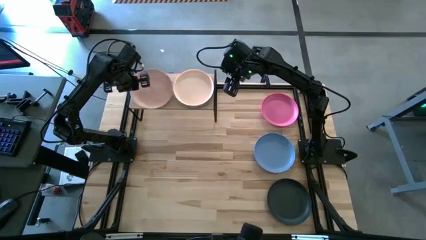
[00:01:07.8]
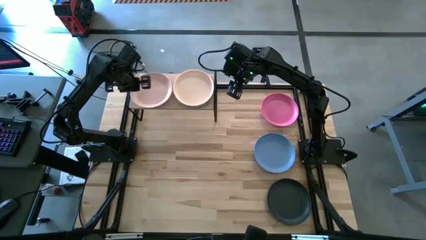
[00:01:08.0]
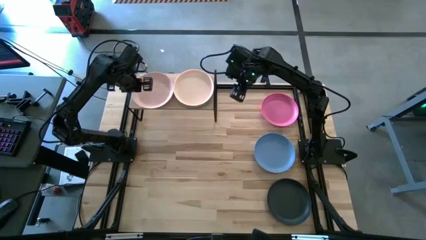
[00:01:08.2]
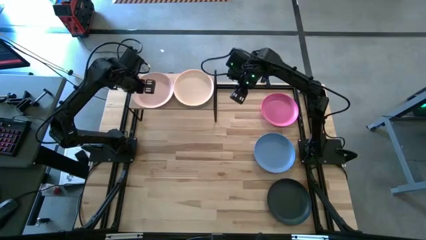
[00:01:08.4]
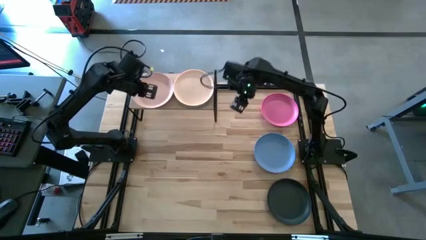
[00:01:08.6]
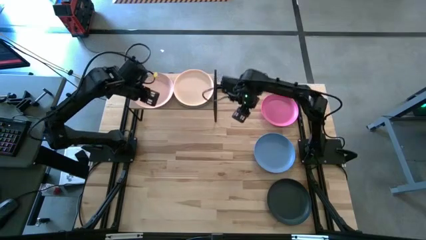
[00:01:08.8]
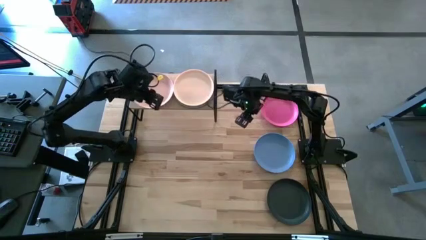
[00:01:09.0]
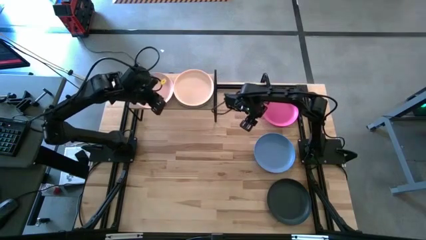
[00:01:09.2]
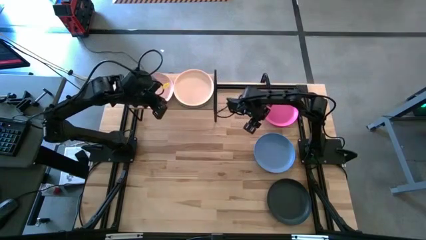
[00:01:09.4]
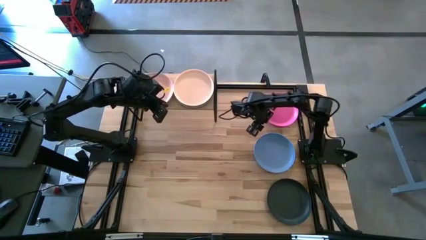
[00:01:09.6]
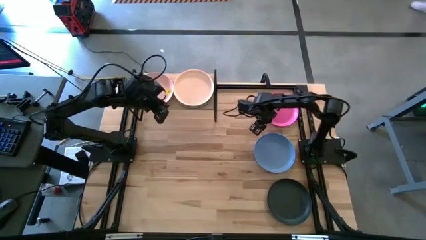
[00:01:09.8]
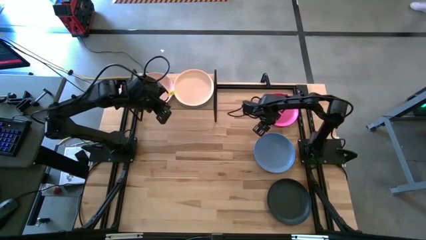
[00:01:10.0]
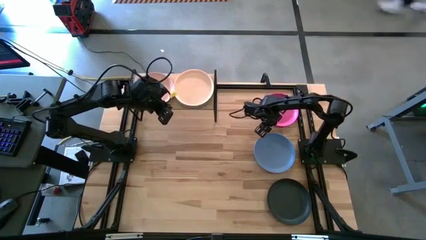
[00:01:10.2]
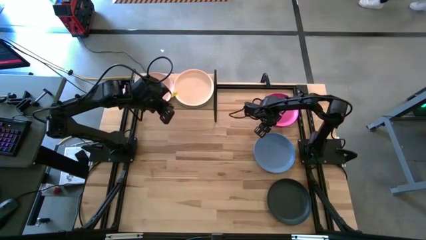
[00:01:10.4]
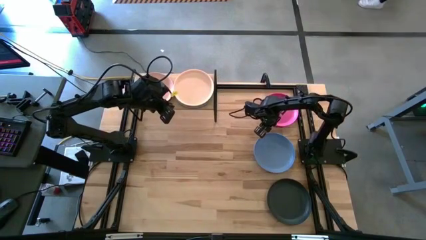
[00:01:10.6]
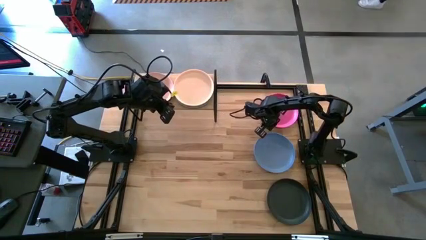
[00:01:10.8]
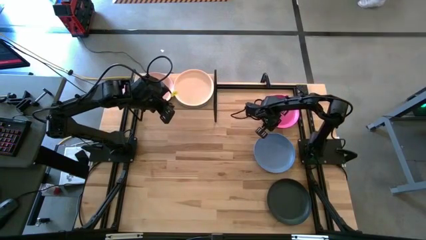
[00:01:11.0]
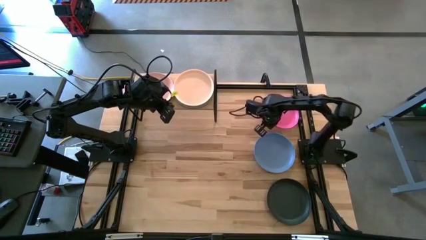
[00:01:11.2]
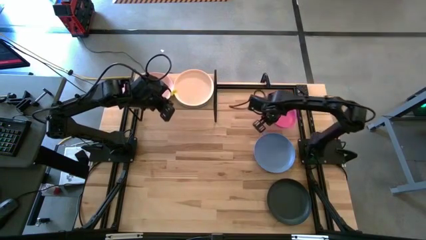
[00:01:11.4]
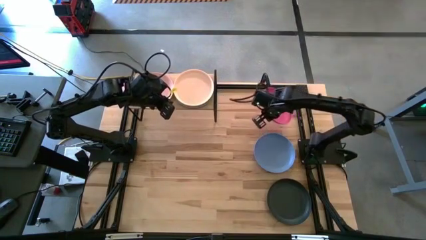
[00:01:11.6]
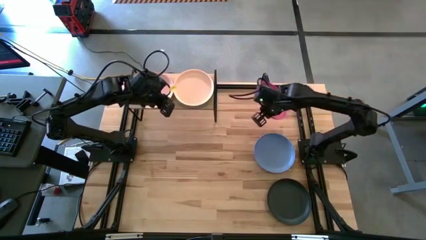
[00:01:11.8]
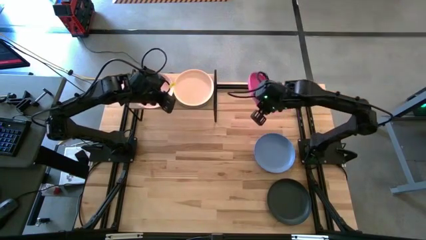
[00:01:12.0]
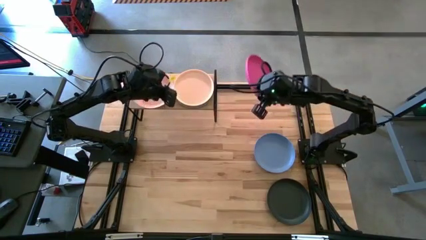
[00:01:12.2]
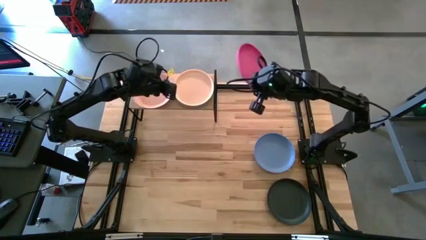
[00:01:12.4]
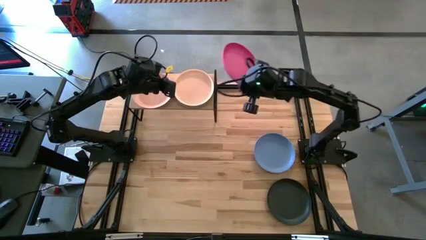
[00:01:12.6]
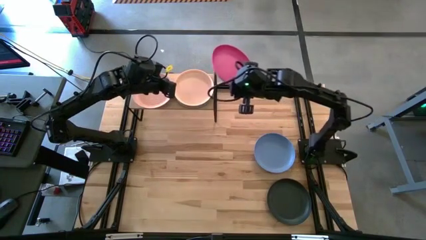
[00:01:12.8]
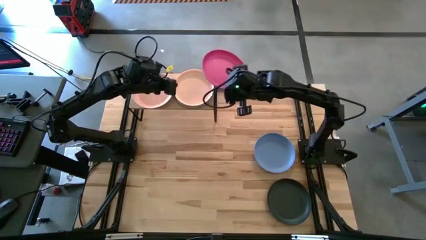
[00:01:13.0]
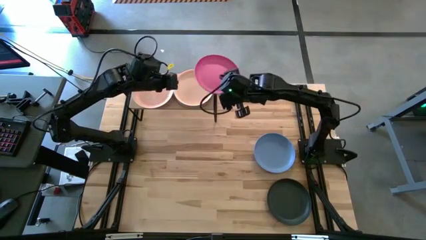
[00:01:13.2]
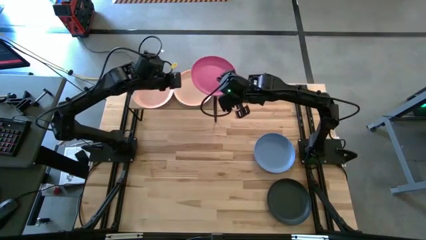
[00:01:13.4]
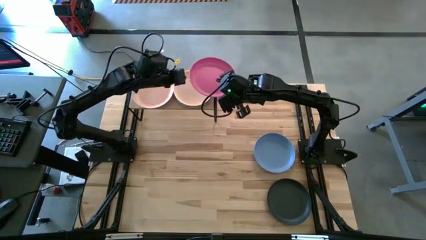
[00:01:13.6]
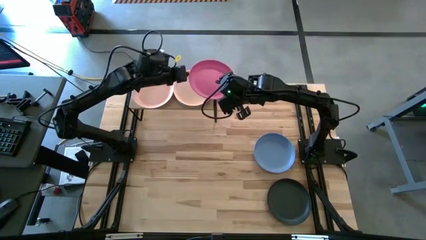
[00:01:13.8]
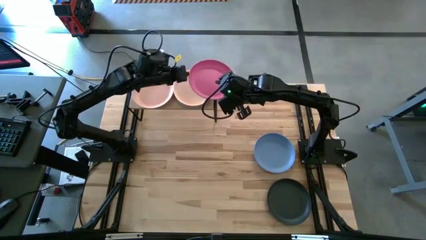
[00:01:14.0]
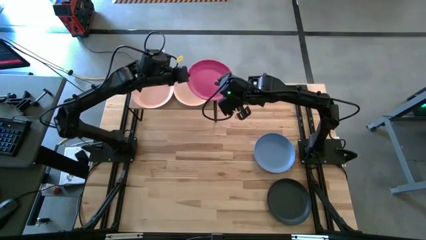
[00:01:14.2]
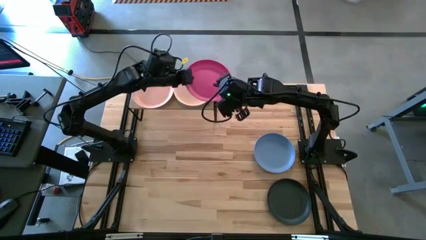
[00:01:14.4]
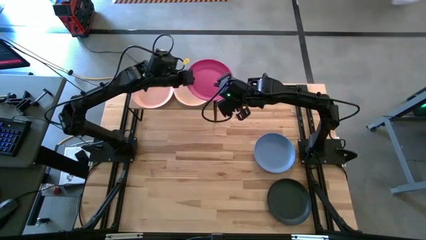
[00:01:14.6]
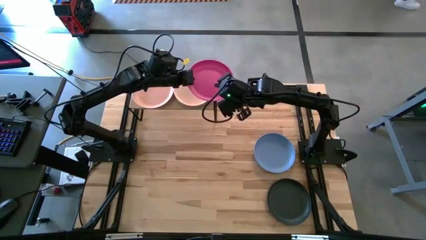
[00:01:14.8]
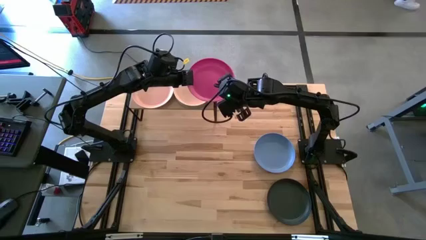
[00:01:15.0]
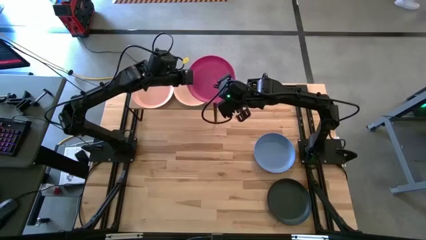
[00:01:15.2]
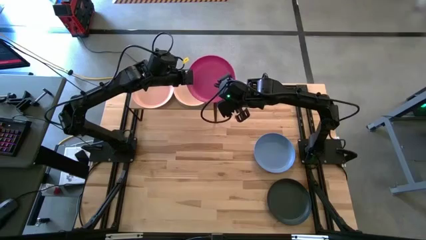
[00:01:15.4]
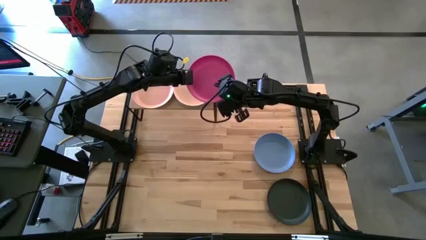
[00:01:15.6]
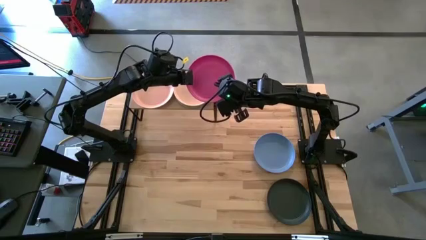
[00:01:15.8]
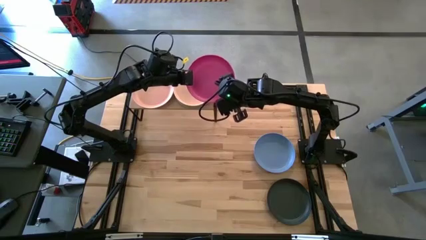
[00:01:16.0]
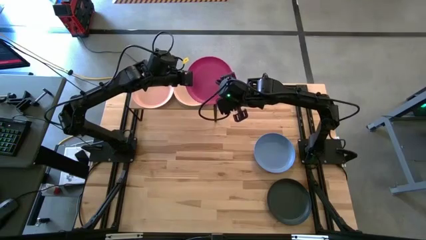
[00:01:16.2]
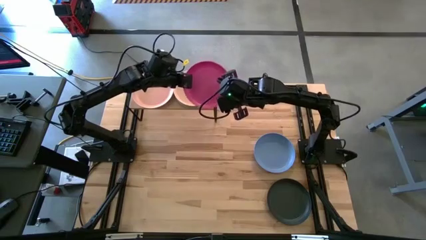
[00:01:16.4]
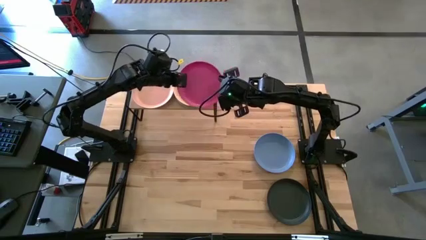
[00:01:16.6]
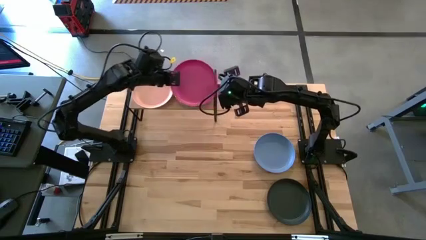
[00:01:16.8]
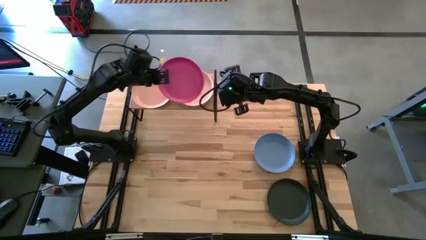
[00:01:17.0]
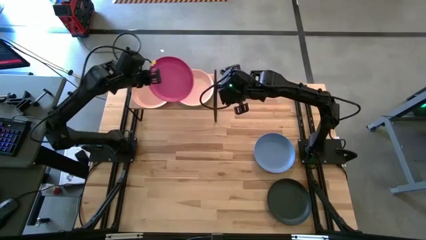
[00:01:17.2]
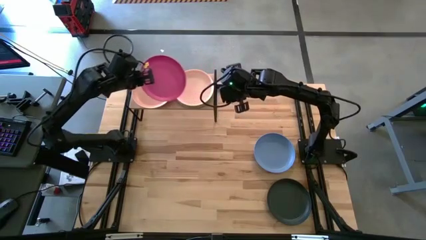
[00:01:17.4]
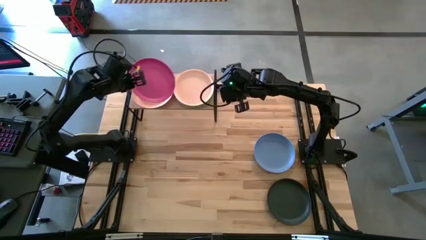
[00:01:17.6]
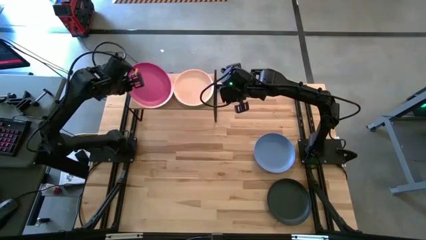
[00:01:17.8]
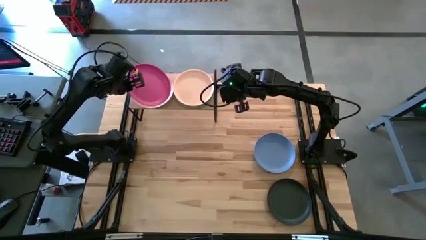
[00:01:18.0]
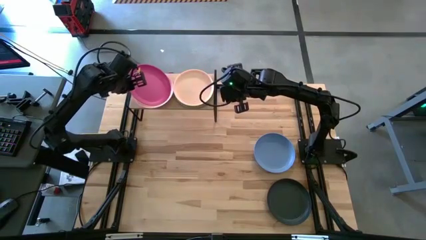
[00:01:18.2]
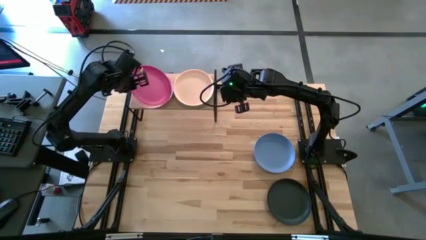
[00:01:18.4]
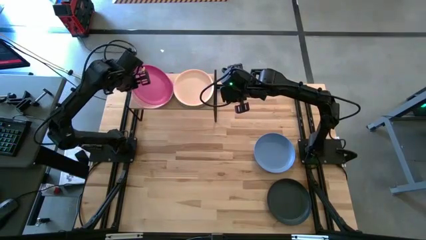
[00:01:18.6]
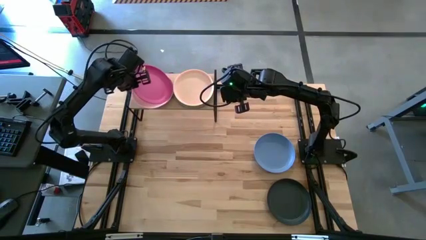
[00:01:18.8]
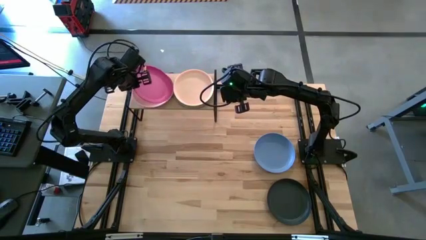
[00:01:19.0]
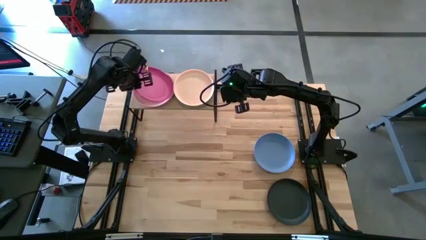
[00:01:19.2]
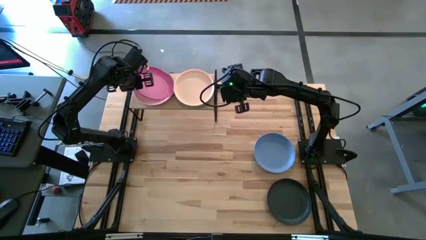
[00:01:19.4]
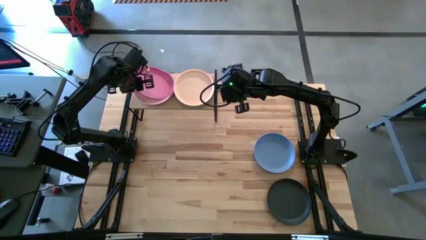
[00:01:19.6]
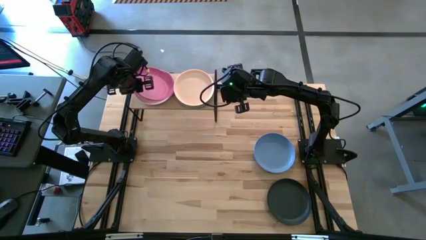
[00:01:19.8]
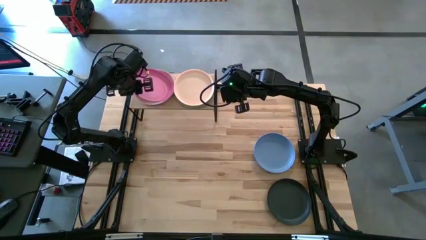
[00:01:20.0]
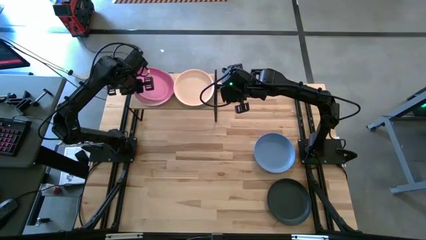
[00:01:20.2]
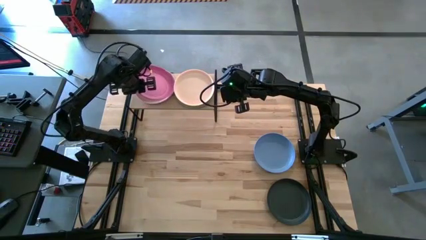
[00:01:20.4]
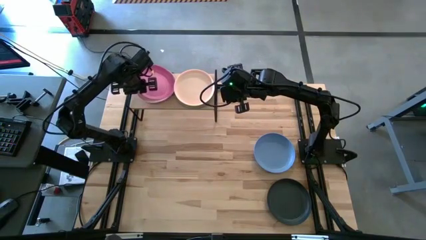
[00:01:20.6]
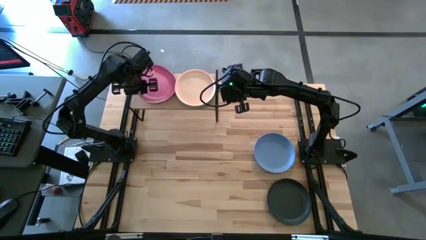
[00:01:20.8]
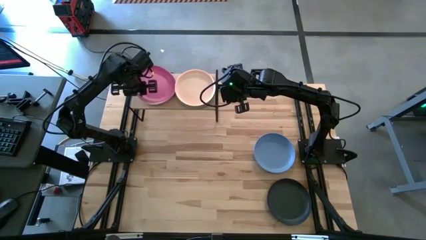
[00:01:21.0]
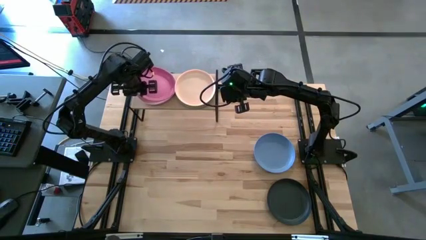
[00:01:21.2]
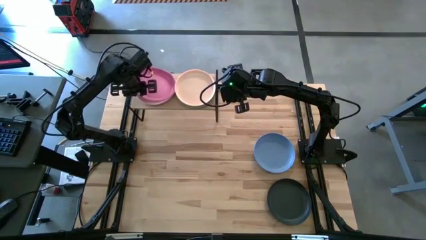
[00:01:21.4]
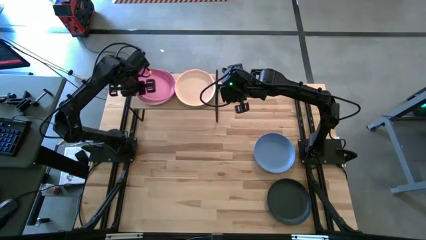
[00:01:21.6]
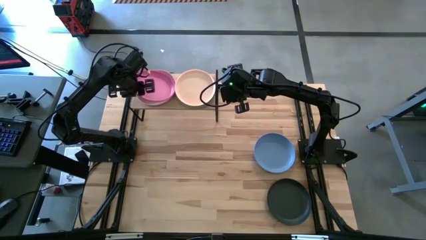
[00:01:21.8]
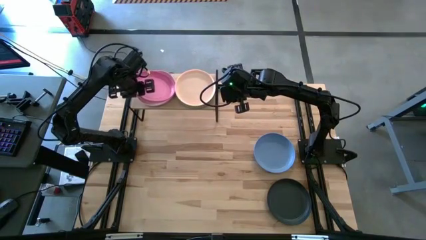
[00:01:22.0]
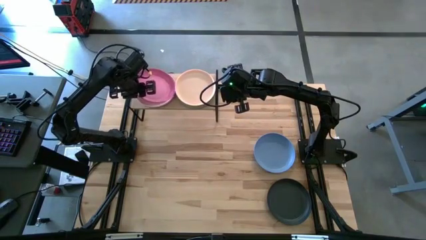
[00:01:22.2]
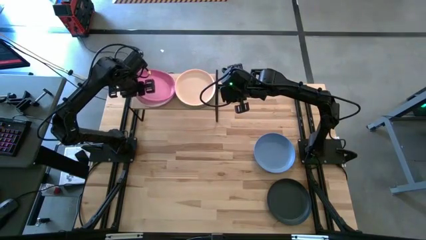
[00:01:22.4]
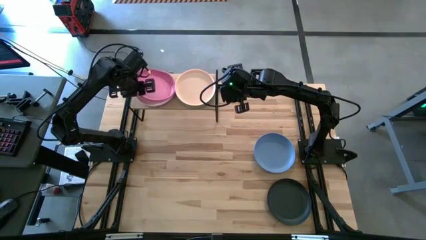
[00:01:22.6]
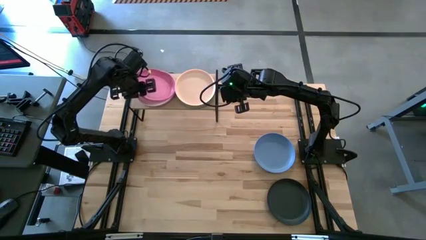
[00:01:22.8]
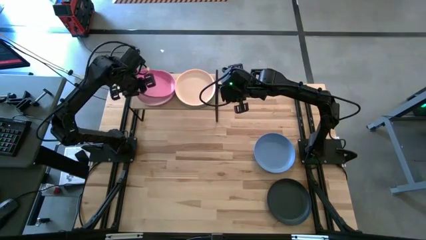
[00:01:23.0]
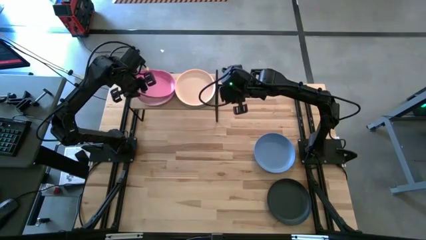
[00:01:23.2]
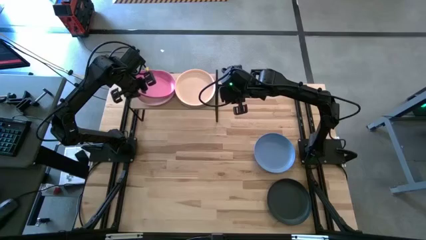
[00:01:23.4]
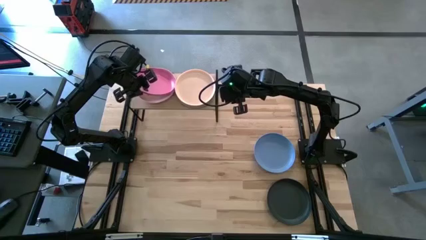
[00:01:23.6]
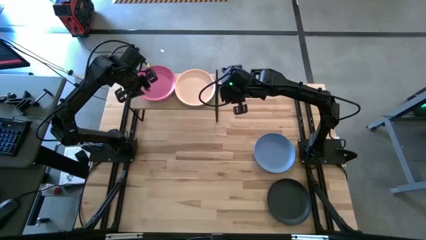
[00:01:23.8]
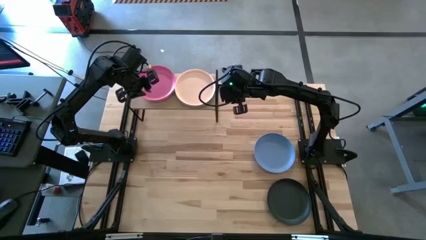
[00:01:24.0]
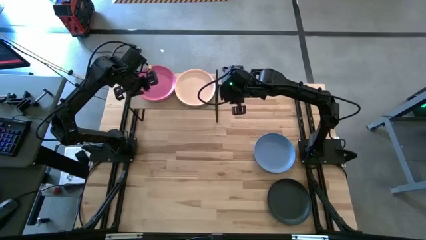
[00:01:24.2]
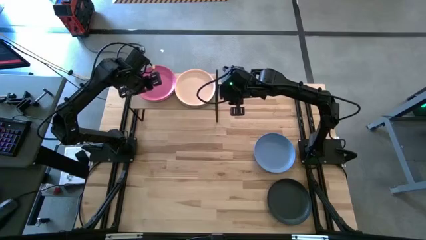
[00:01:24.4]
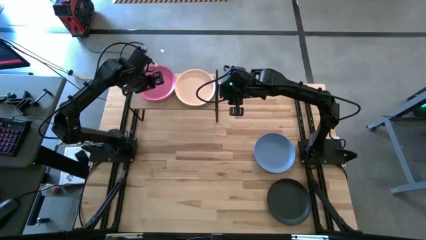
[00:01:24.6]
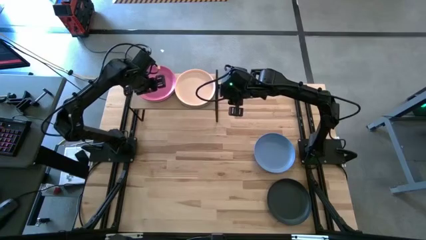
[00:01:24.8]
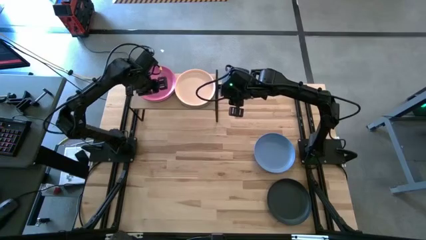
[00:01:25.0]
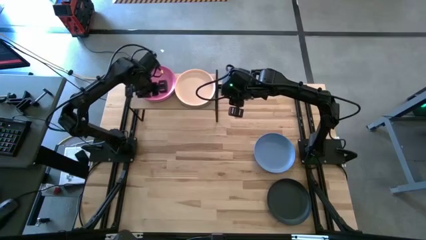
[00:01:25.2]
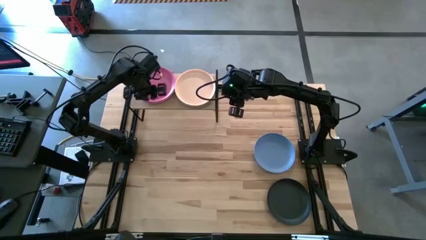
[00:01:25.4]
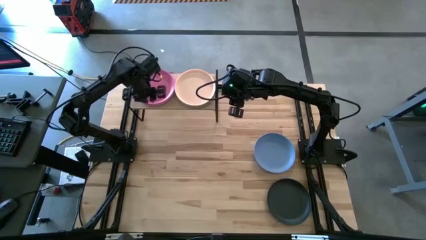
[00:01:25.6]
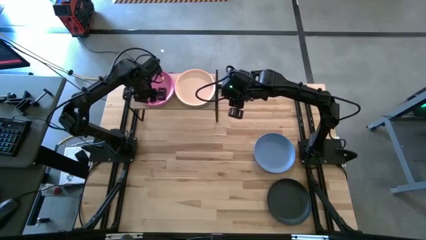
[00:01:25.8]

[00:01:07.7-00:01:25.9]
Task: Place and stack plates onto a shelf
Stack the pink plate on top of the light pink plate on the shelf
